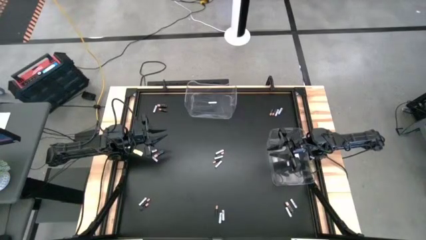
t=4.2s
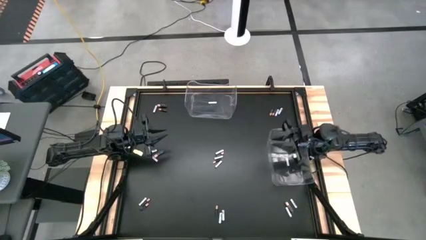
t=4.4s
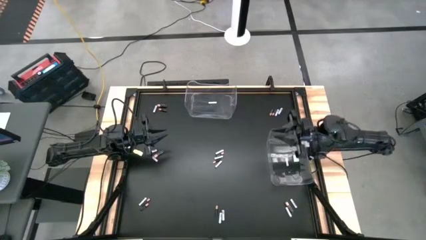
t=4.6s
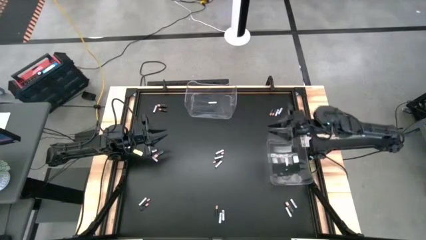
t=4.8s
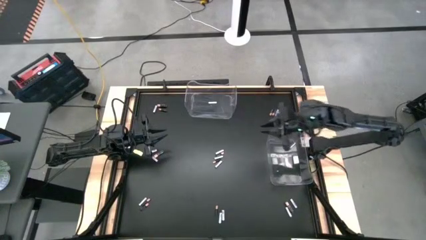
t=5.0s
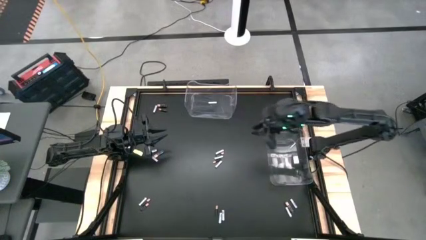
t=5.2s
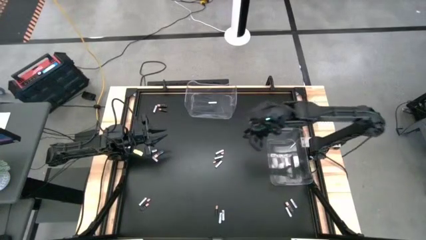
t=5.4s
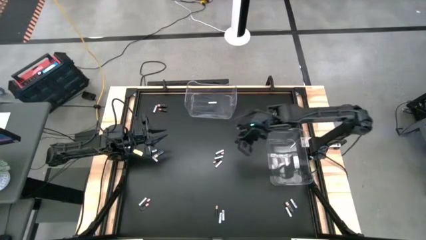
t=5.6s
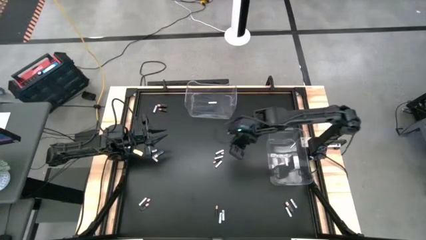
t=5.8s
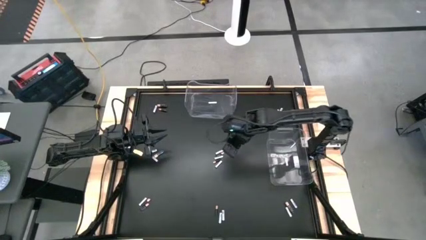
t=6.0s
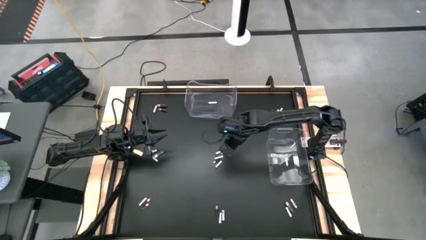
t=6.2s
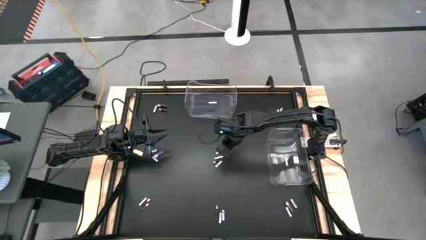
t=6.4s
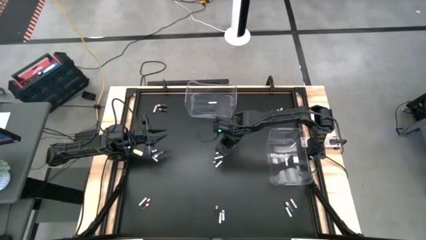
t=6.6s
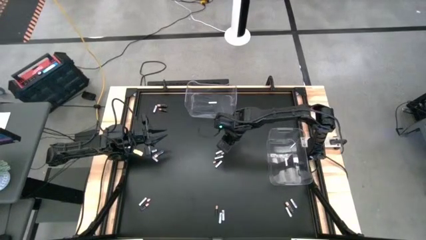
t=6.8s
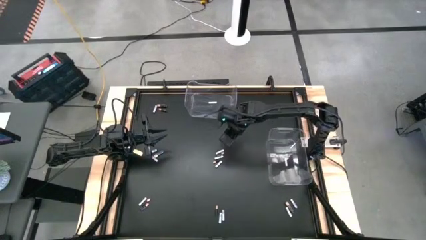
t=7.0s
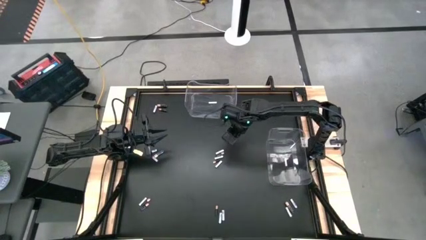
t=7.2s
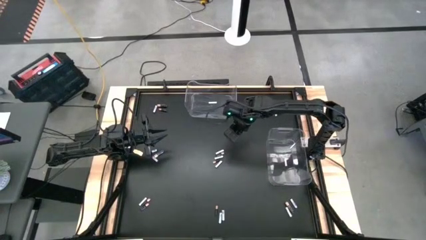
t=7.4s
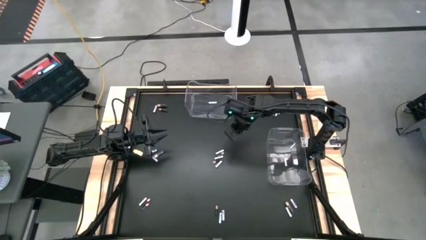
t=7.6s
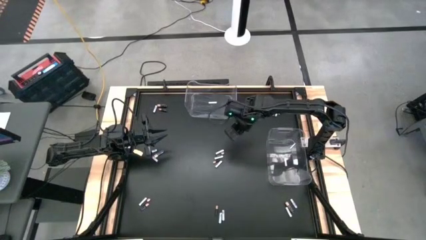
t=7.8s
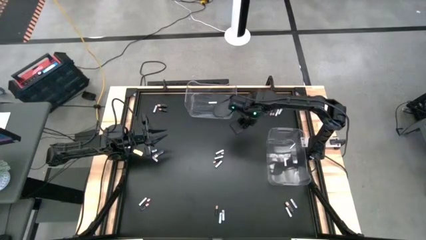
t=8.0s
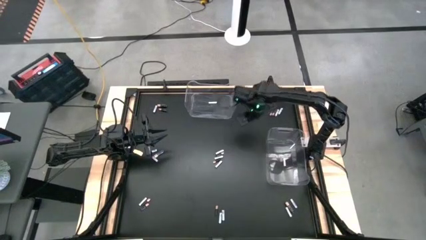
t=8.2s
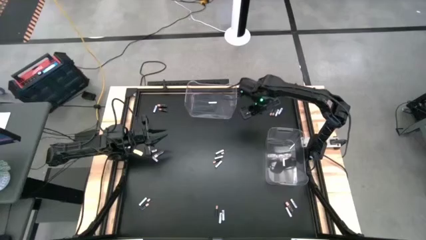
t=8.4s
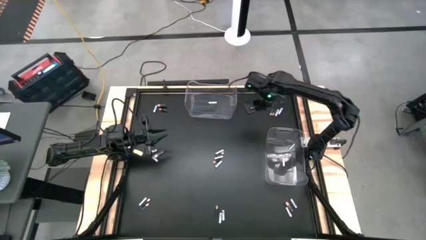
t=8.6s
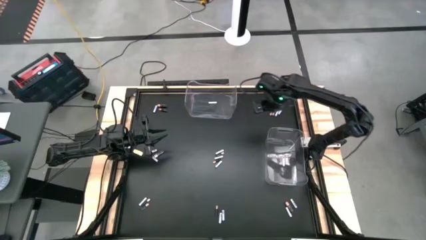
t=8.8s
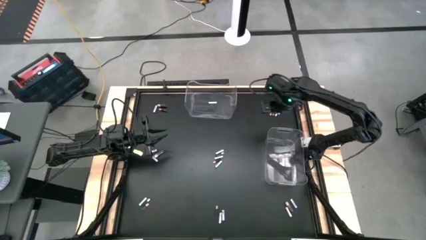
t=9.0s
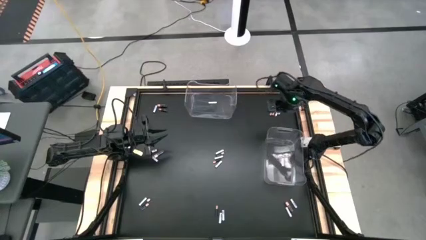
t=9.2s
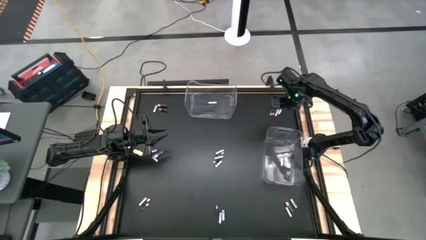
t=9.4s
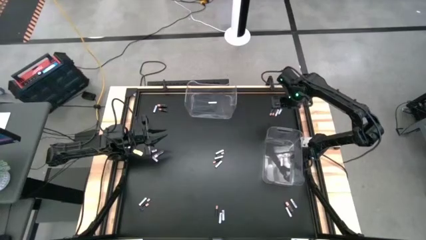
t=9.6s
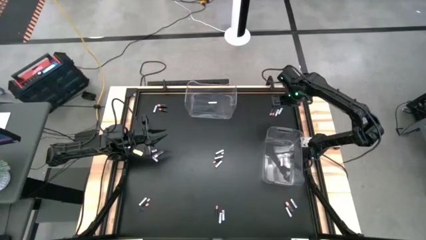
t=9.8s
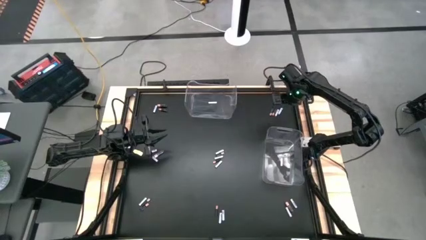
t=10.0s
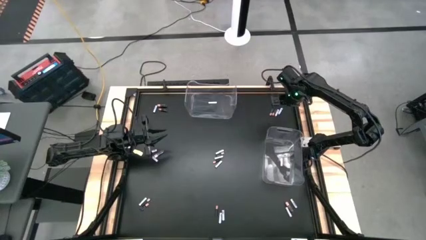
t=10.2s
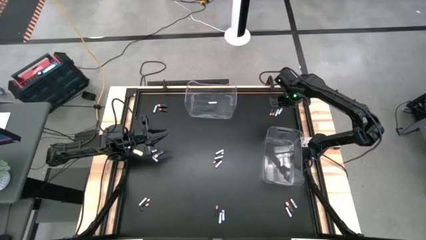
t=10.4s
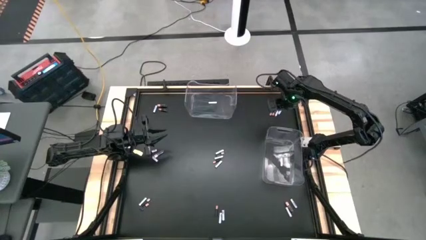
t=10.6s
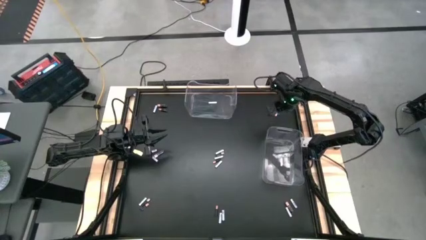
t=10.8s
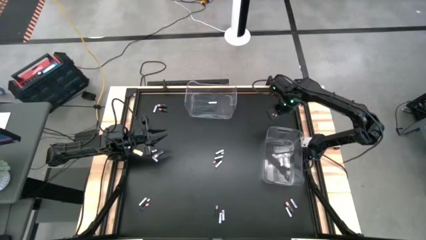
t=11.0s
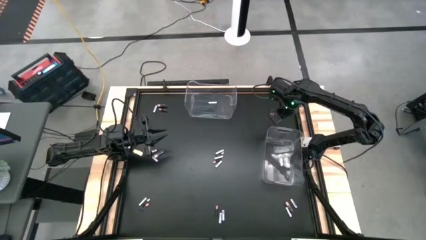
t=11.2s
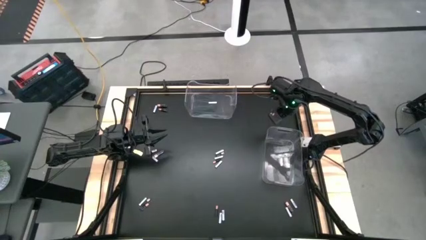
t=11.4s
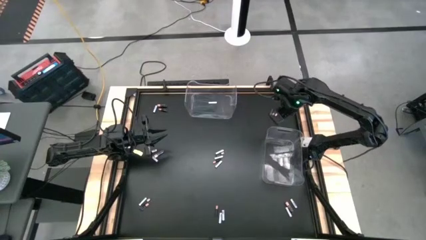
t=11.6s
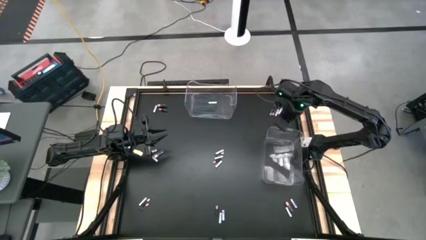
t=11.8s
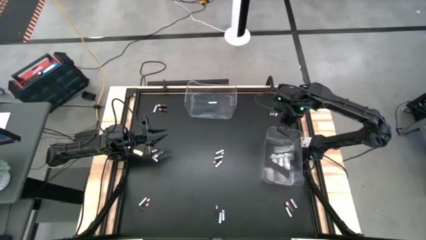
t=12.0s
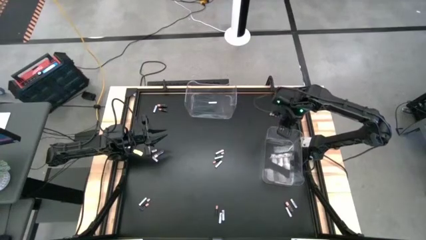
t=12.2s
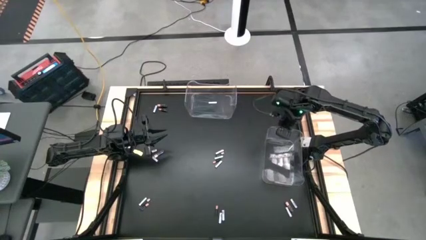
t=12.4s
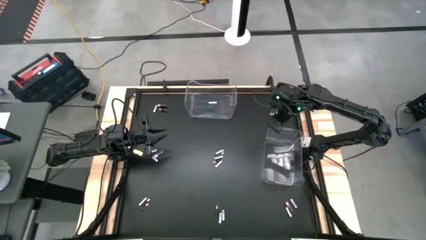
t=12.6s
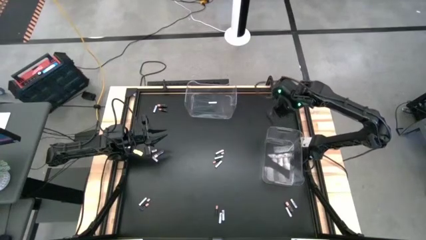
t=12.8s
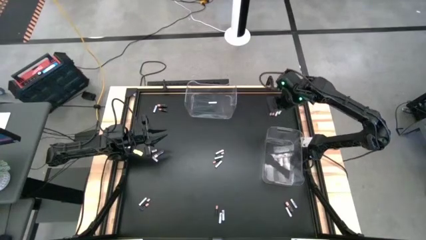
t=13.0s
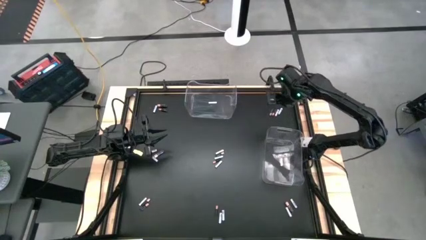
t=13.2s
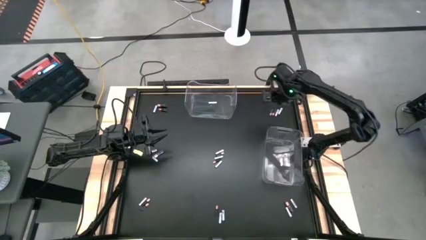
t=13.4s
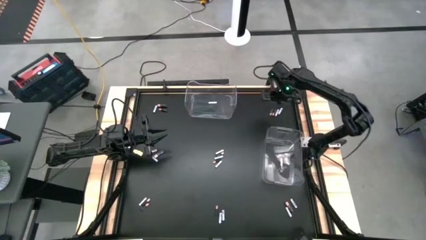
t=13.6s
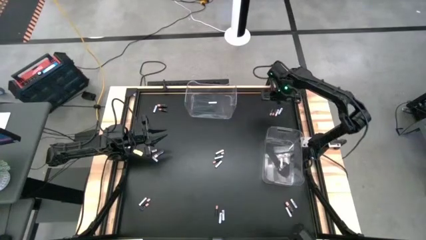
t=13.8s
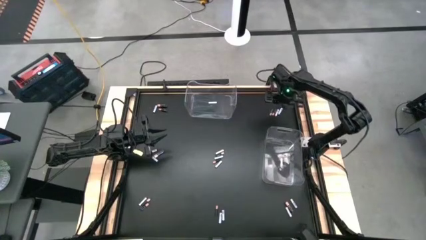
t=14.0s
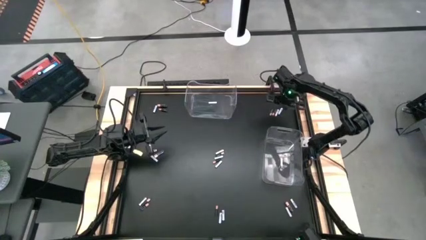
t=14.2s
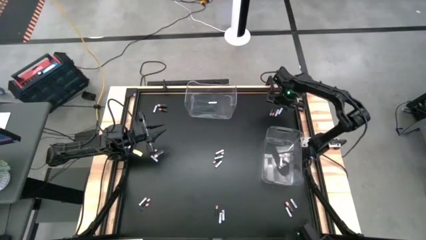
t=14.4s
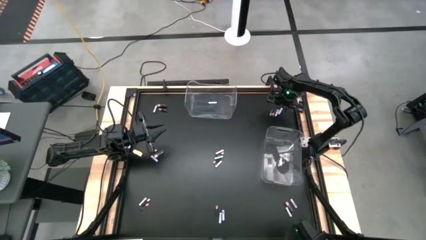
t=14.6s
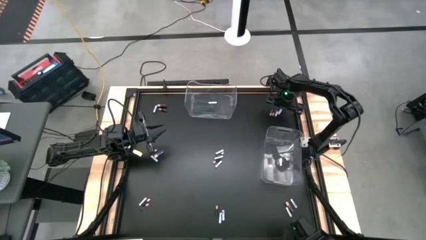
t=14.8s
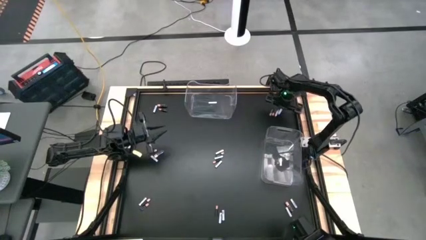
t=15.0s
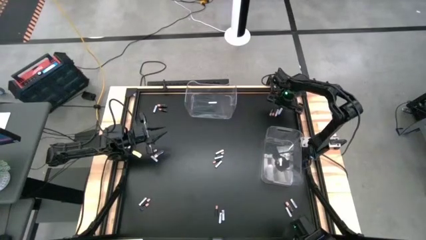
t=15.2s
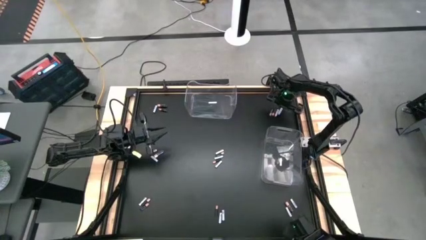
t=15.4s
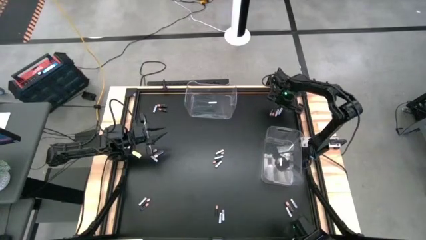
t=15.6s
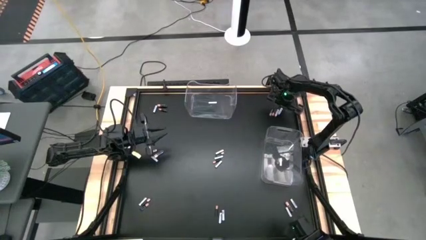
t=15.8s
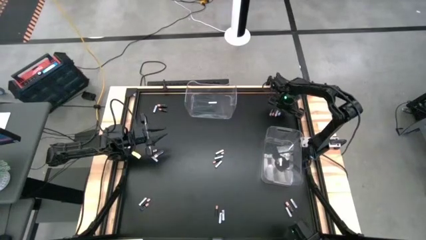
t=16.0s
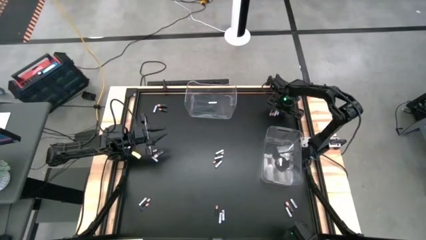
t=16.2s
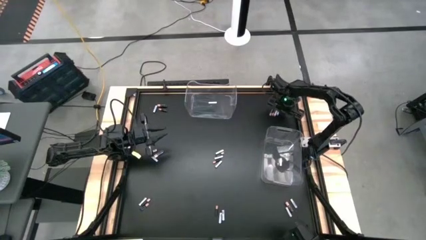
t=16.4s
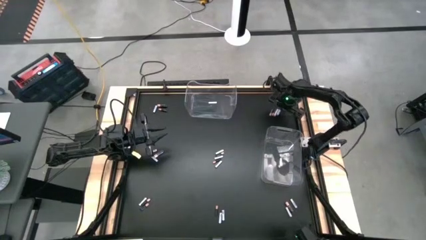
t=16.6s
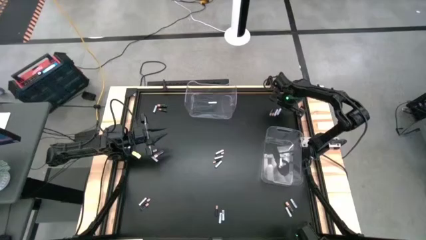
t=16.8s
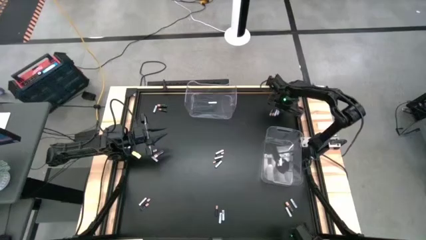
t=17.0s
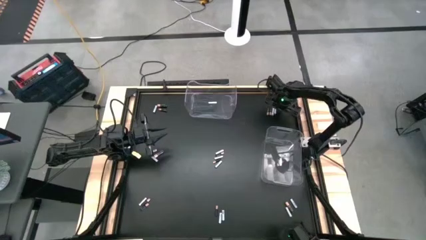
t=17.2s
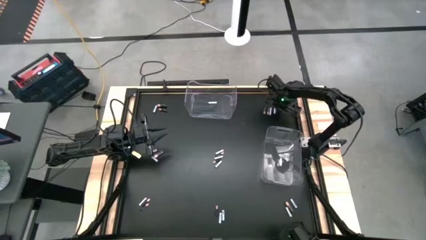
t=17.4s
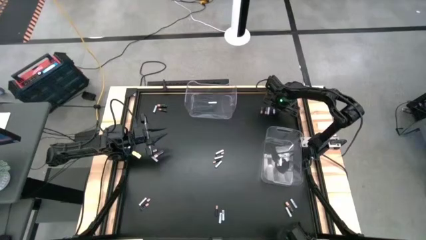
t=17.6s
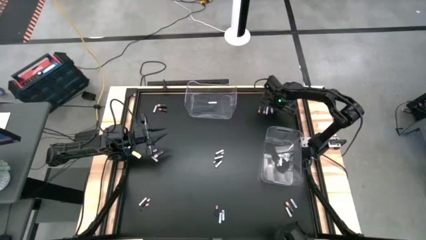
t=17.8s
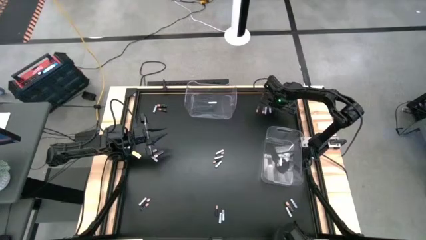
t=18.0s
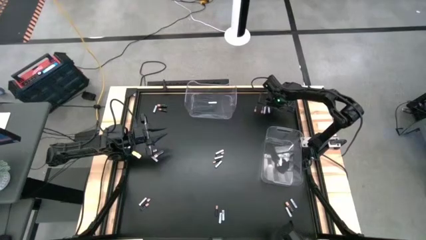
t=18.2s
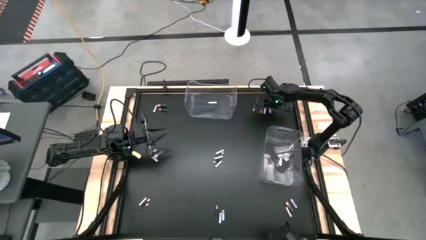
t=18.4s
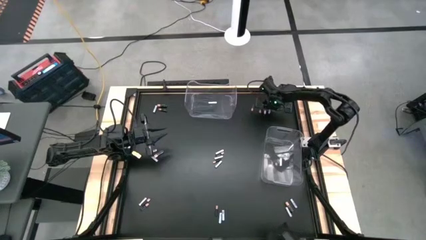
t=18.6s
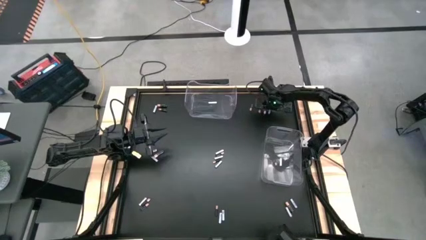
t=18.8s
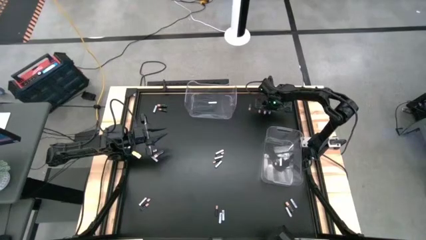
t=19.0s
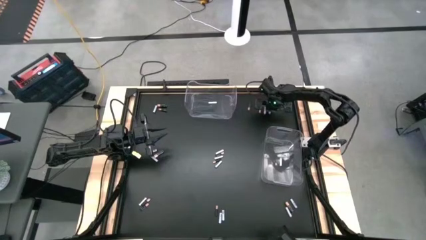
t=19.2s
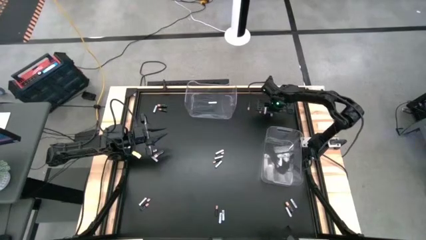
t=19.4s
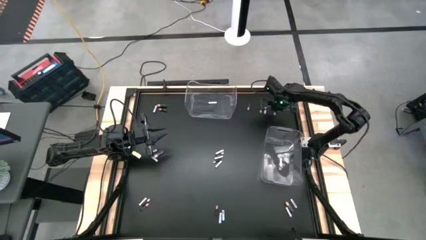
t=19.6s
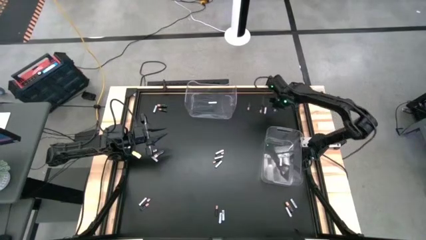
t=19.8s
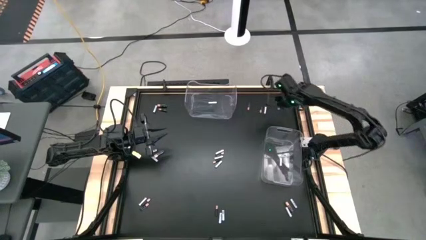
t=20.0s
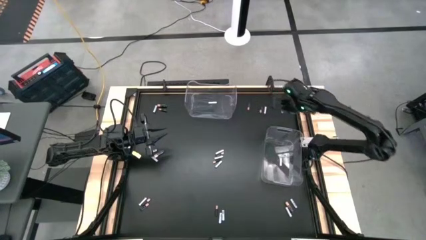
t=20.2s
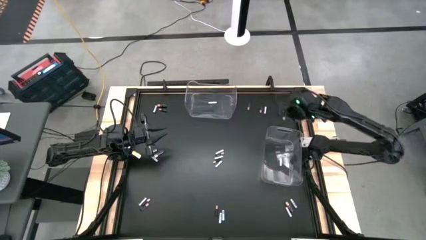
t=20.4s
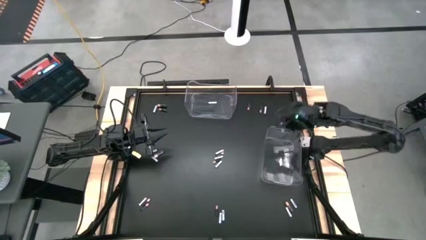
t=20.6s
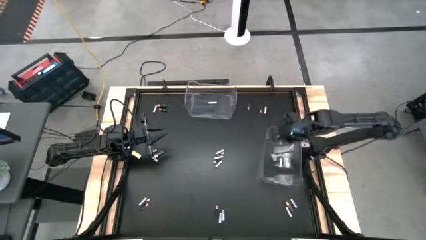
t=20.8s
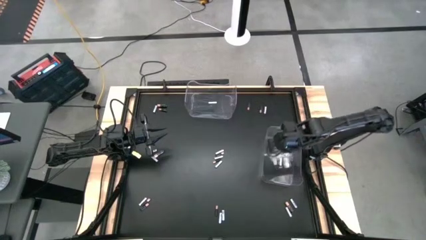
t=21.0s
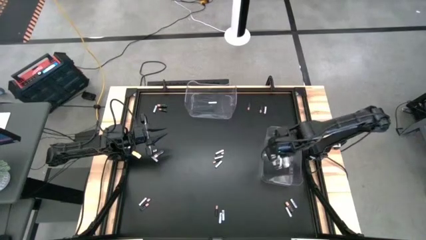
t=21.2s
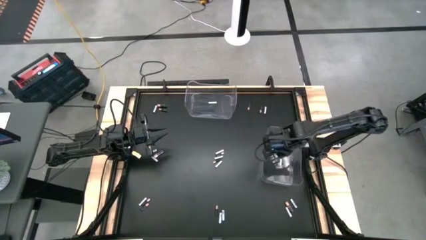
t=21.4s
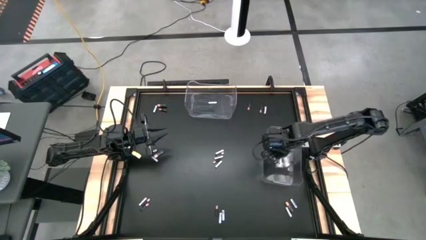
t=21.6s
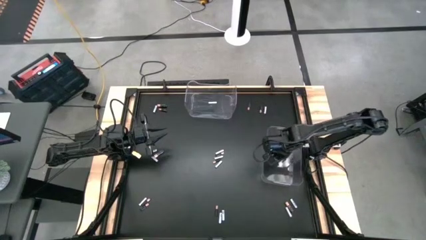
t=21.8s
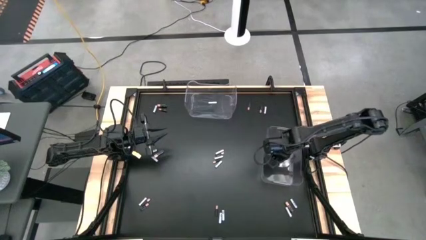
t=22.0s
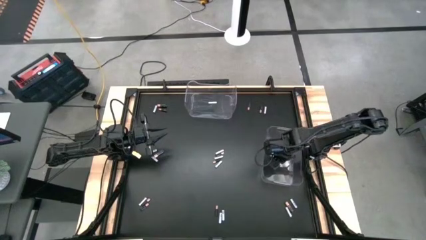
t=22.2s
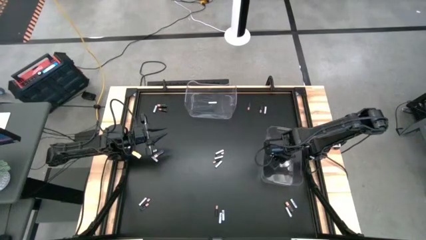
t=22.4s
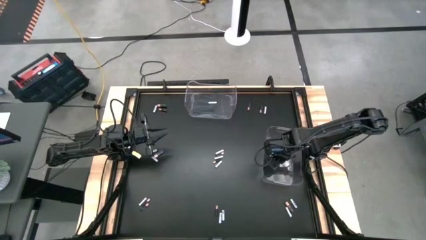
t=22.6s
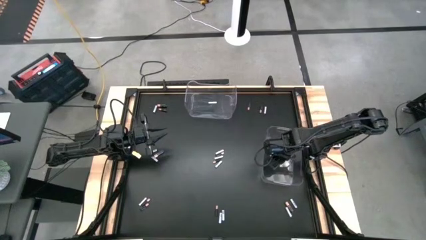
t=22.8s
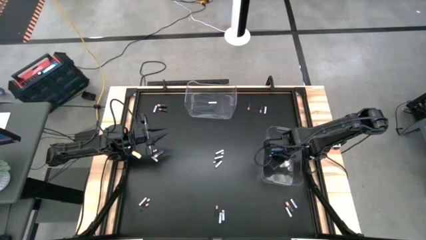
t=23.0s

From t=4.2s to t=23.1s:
Task: Sort batteries
Put the white battery into the right transparent bin
